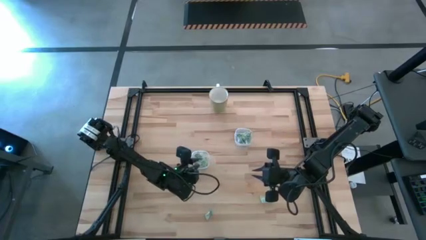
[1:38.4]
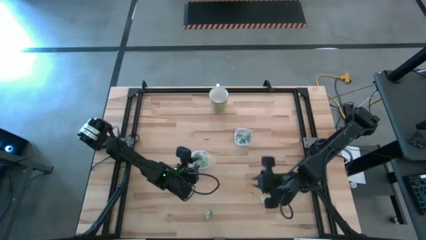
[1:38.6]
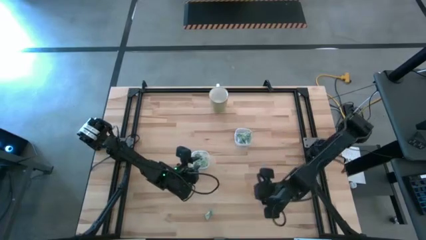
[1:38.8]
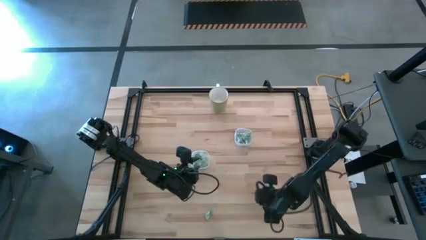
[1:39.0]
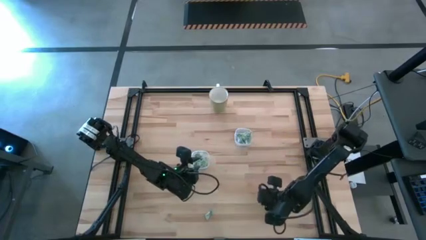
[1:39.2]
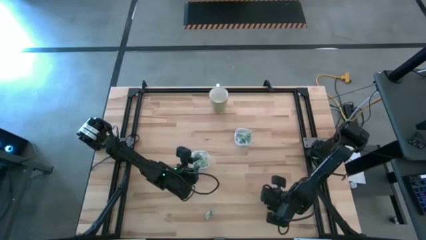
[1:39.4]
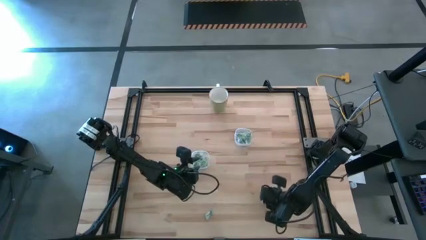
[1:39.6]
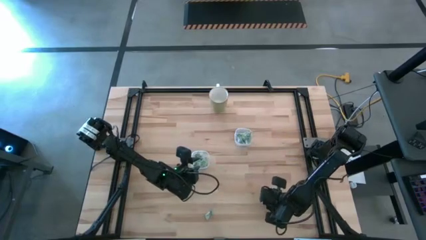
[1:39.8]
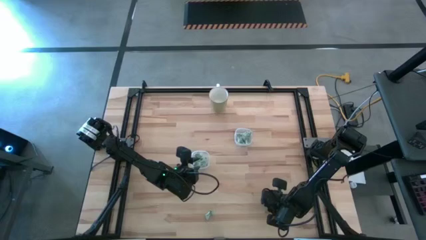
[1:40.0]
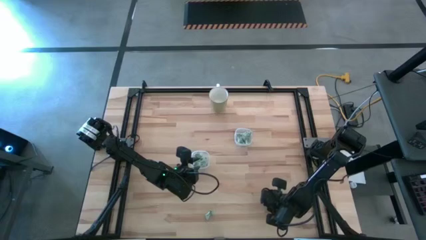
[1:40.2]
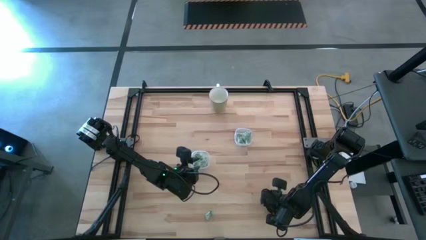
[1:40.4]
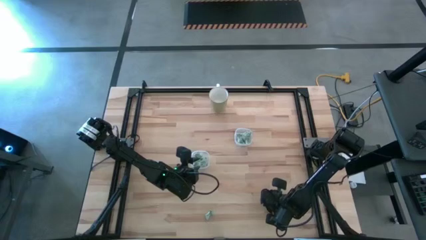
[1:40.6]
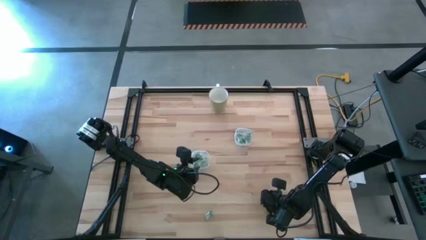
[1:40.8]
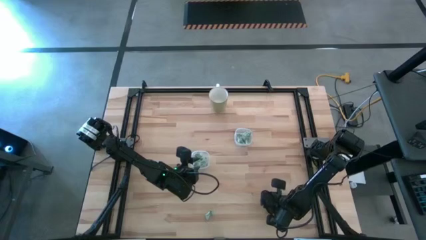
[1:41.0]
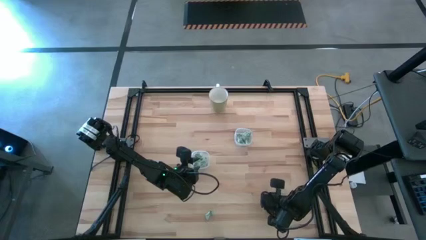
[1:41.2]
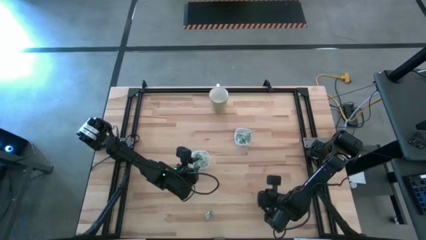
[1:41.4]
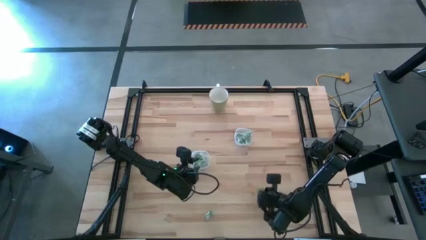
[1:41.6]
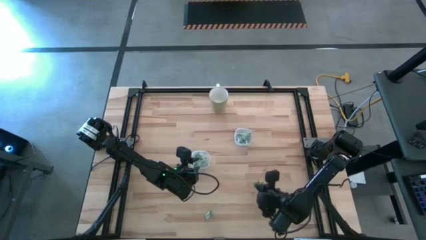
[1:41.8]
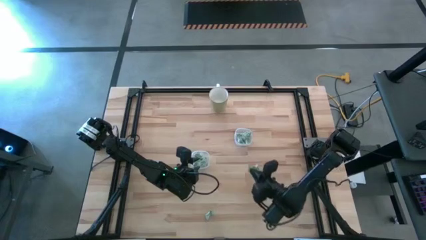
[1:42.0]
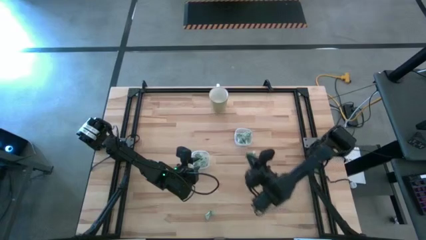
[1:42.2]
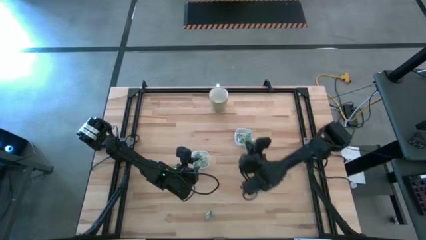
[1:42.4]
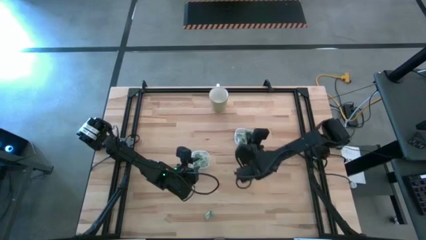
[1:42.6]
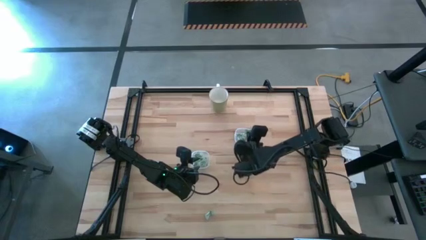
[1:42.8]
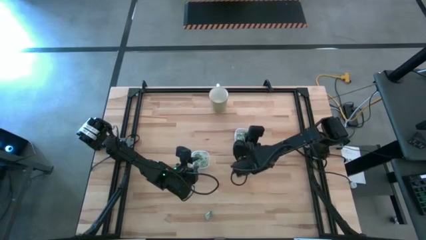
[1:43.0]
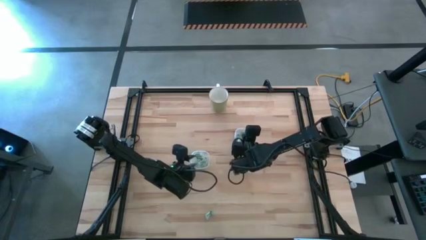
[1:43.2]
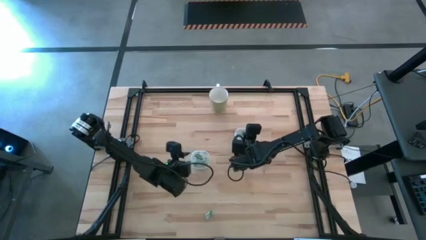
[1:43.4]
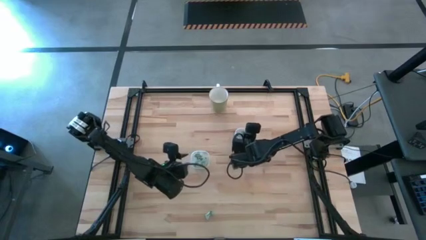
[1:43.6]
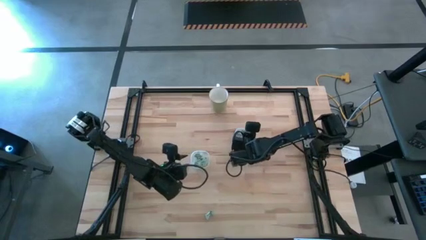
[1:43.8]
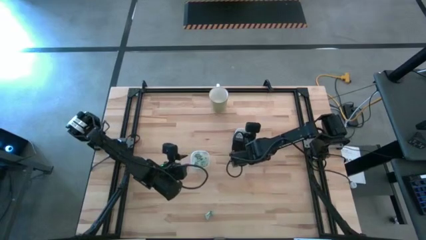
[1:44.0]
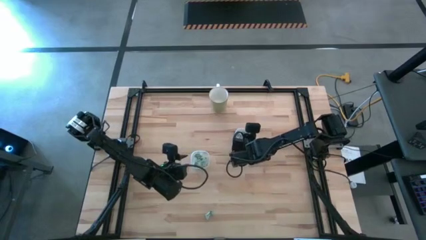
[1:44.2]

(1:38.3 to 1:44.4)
Task: Pick and place Stevia / Truvia into bins
Put the right green stevia packet into the right transparent container

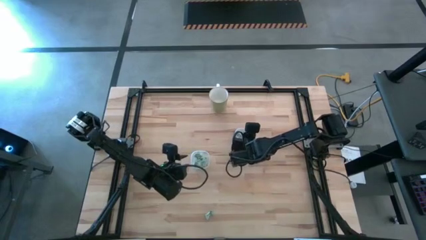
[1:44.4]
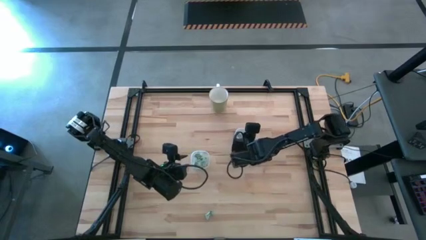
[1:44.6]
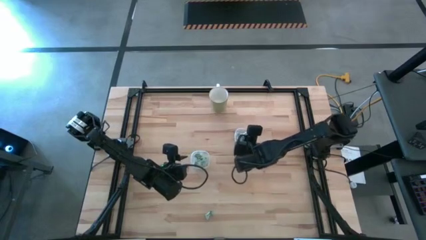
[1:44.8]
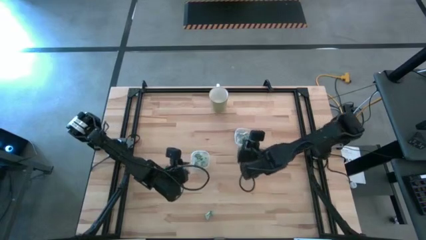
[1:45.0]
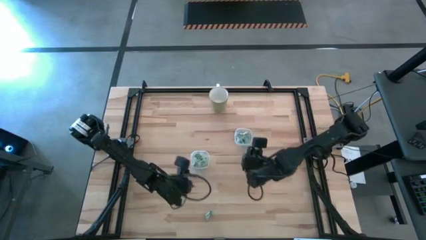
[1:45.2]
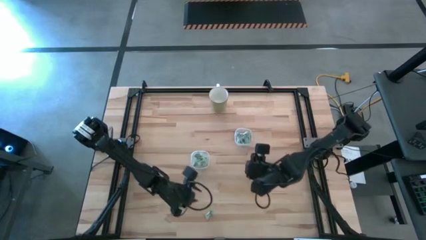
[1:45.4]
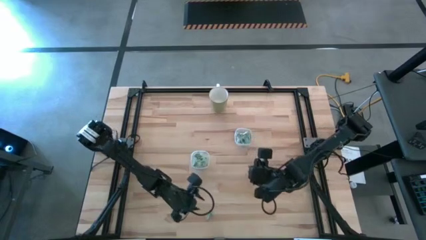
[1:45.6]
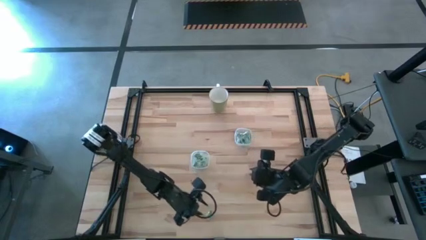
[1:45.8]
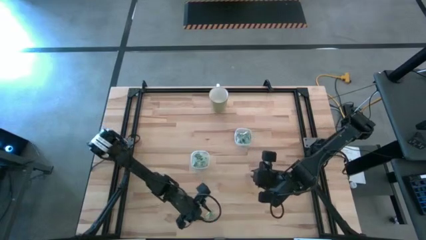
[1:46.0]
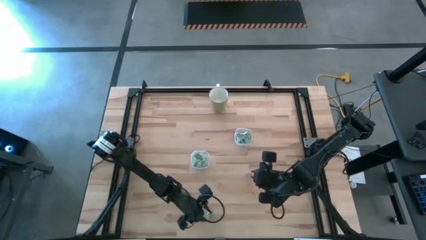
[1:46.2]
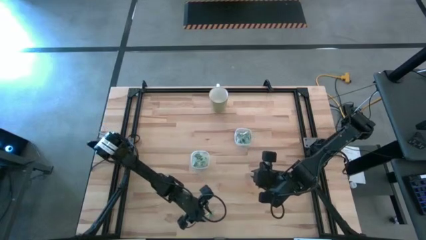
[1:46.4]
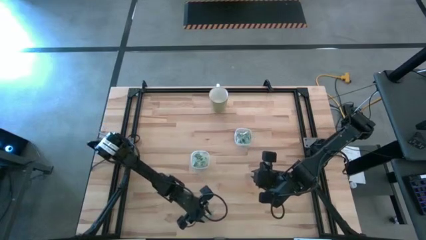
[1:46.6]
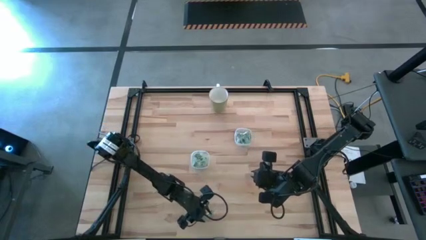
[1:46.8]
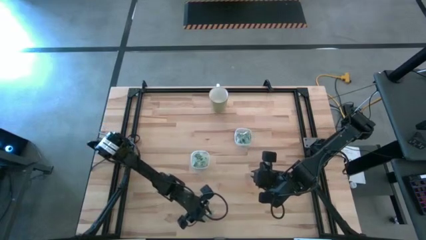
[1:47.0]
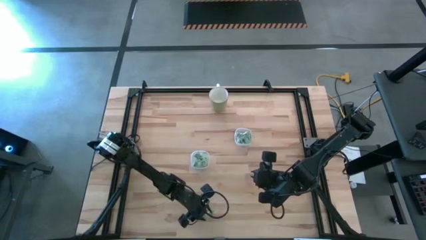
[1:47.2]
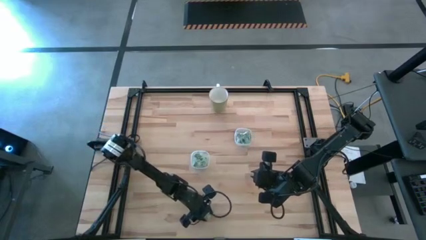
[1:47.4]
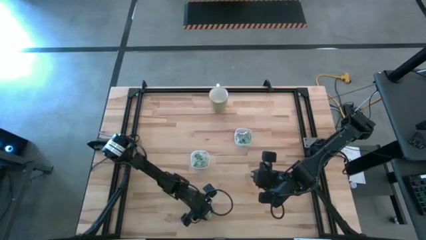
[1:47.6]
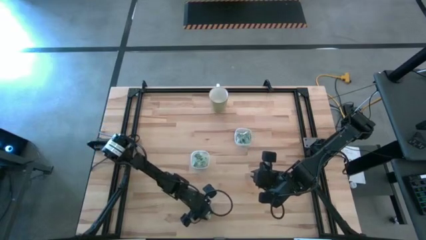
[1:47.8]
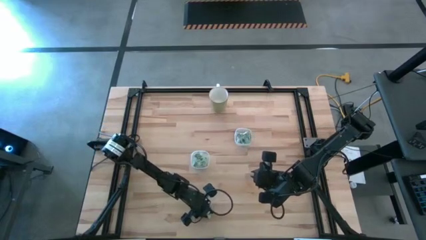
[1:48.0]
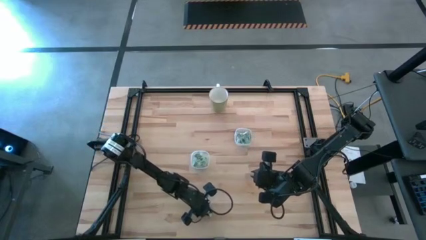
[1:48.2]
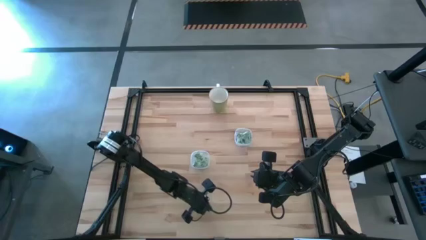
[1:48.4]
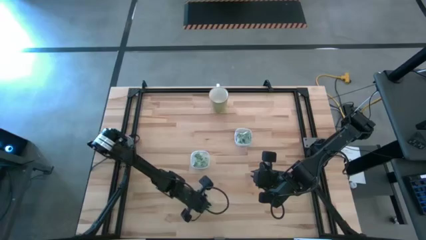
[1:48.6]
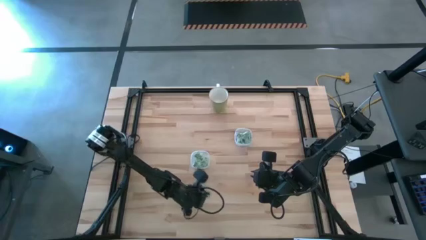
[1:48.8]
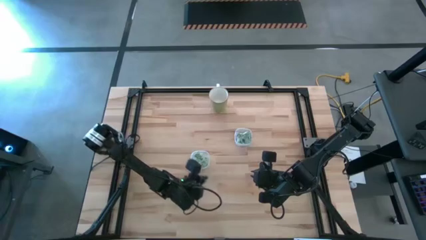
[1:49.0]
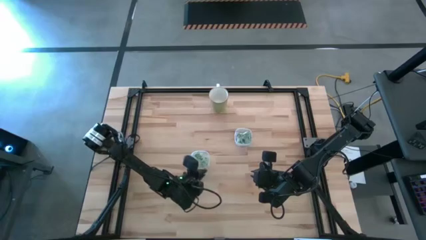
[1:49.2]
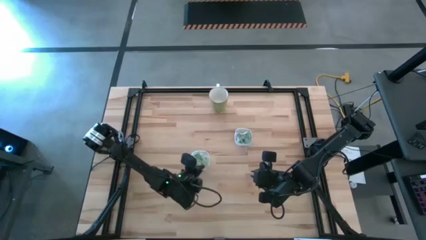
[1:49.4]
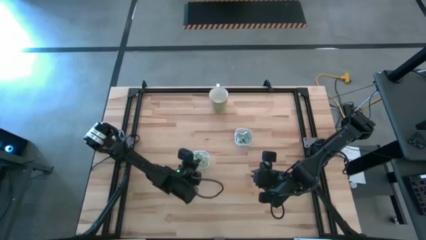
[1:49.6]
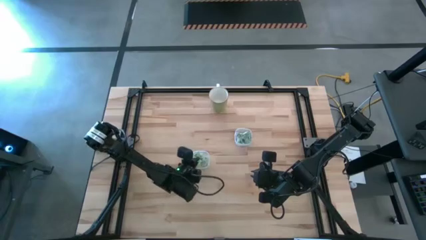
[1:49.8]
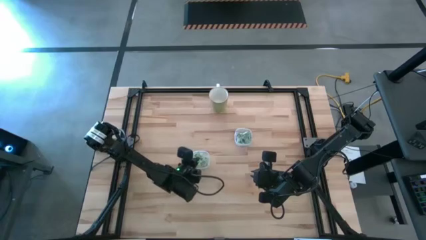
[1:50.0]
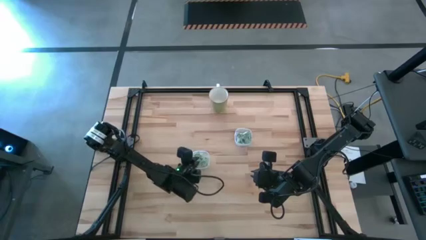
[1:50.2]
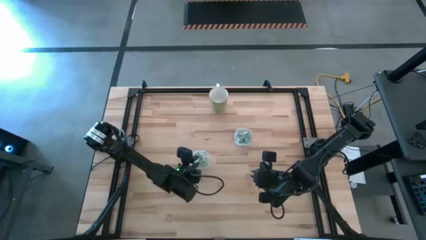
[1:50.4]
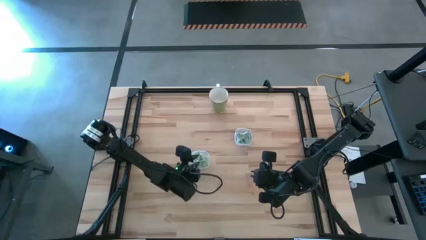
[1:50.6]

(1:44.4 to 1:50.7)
Put the green stevia packet into the left transparent container

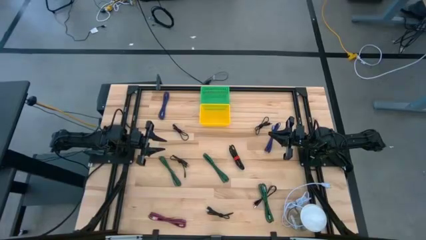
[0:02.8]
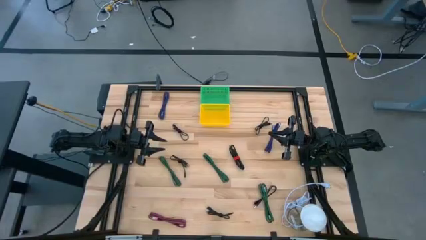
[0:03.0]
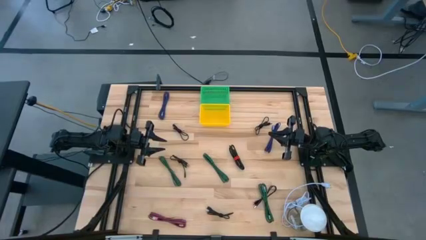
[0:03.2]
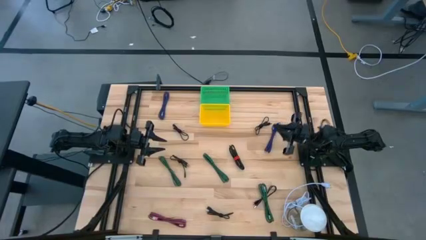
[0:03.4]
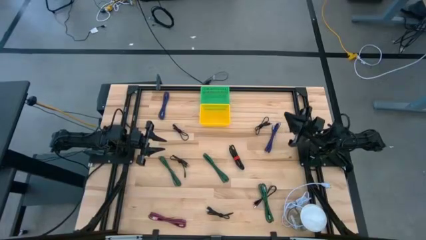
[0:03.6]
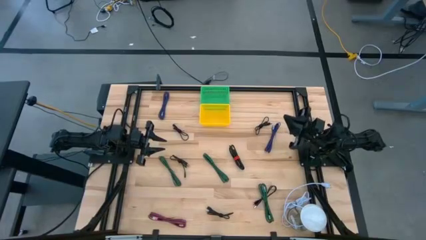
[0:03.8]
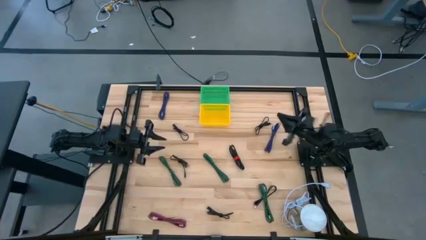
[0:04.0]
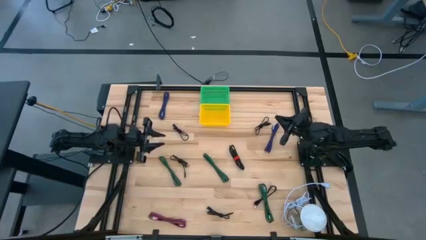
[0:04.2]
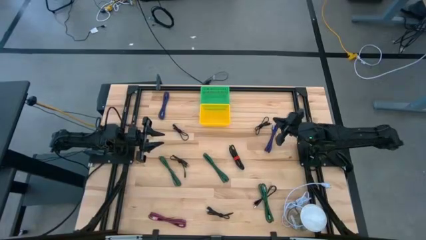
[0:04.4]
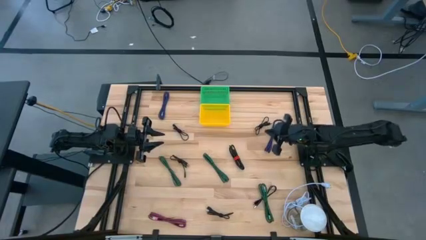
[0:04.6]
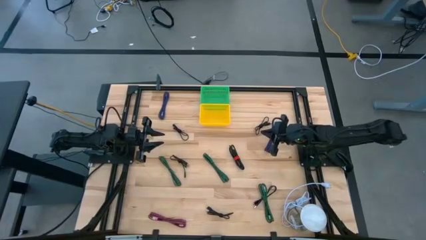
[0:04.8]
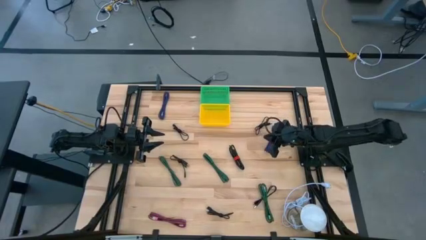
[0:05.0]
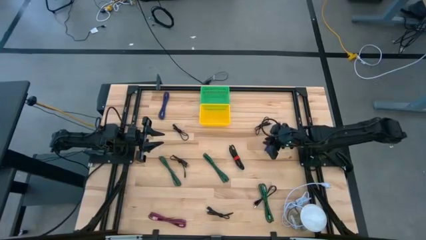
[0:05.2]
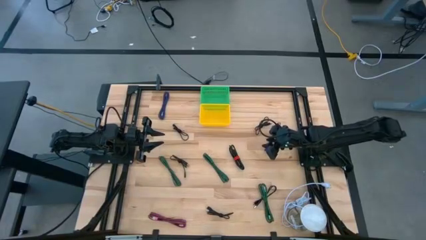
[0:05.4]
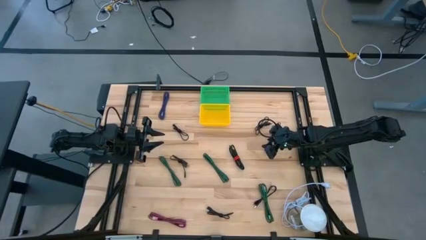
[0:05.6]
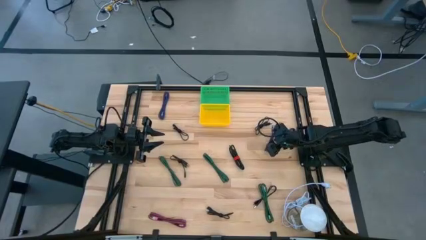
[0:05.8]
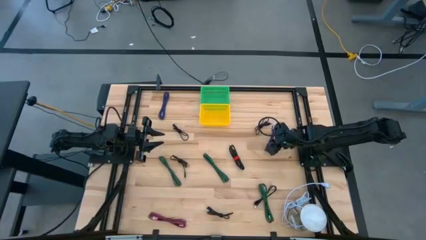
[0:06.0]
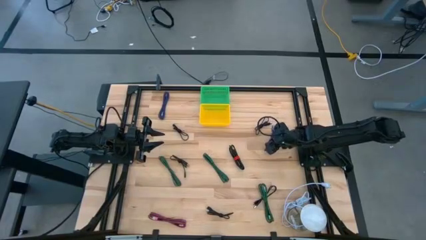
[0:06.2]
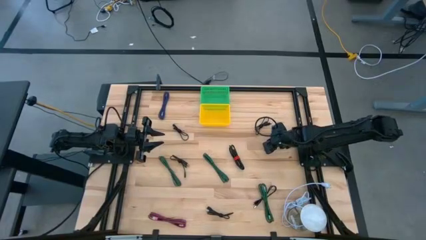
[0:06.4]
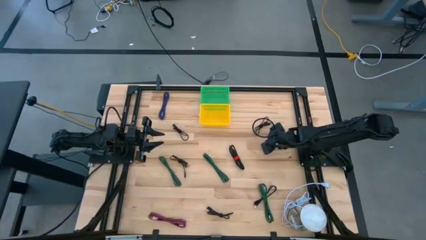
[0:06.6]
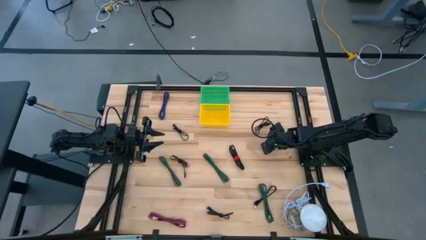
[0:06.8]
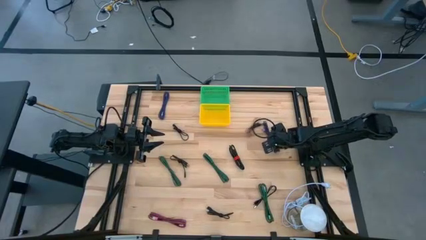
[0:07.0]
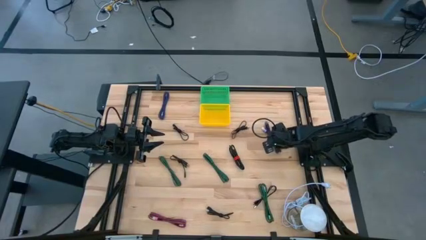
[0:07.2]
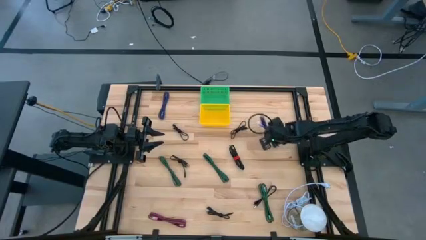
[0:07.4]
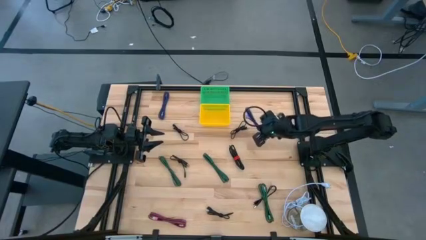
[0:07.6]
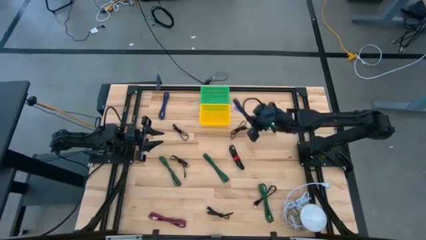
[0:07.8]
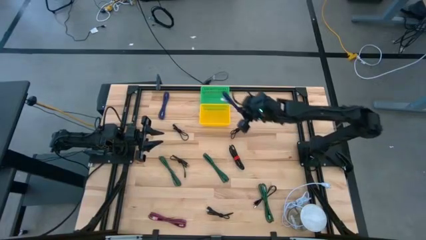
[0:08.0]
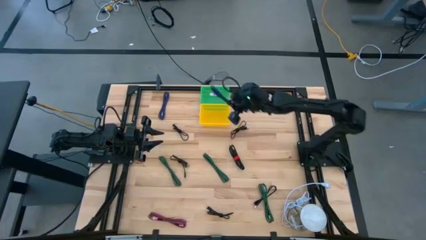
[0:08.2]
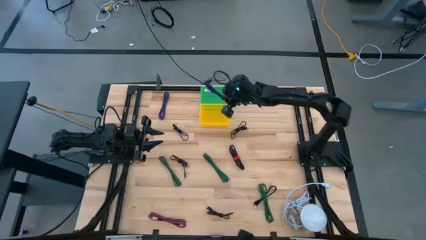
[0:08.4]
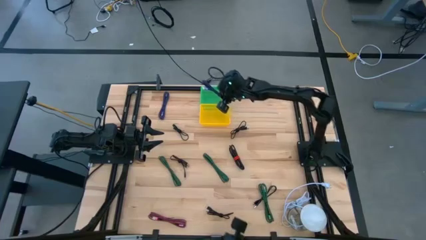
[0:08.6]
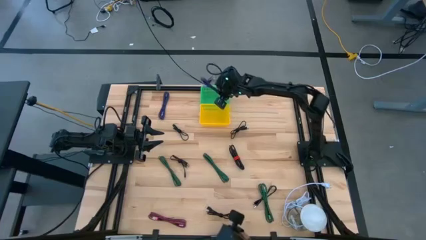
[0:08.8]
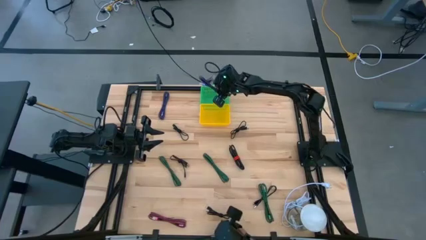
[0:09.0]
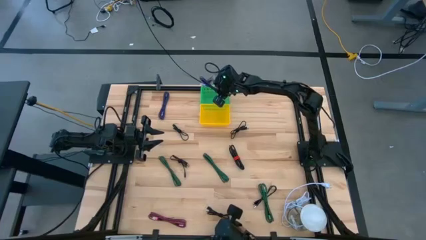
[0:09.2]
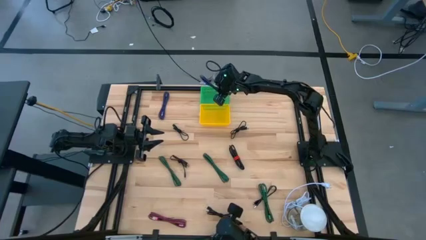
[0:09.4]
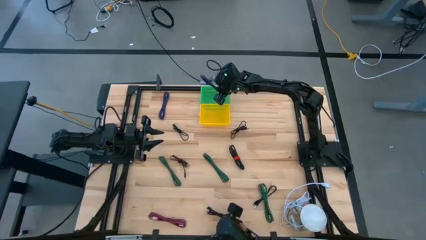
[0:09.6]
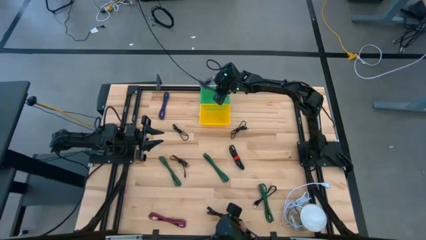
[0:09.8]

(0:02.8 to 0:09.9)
Task: Pick & Place USB Port
Put the purple charger cable into the green basket
